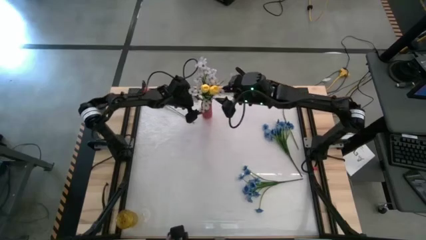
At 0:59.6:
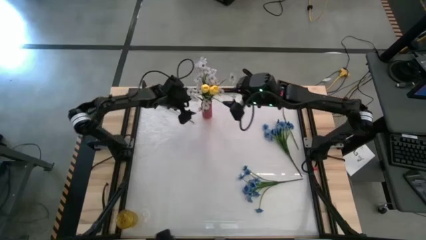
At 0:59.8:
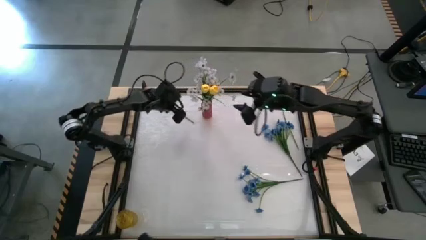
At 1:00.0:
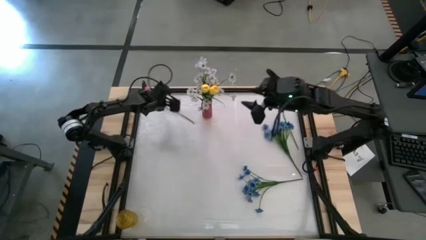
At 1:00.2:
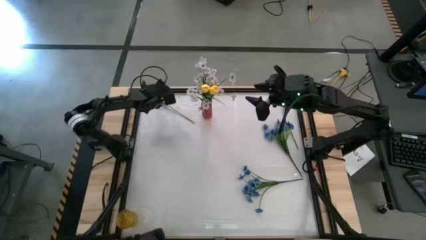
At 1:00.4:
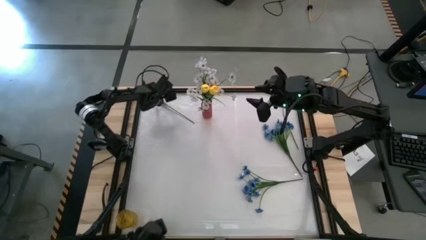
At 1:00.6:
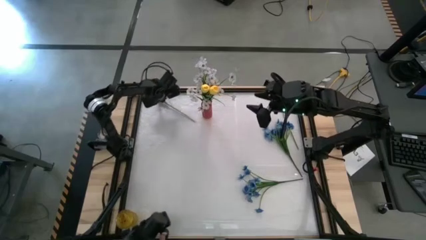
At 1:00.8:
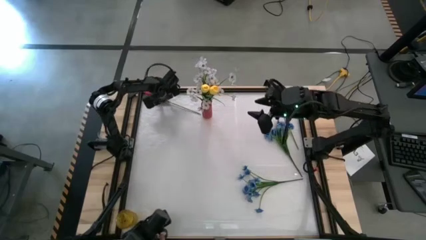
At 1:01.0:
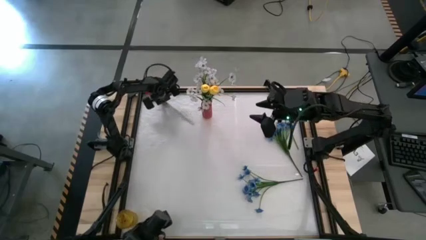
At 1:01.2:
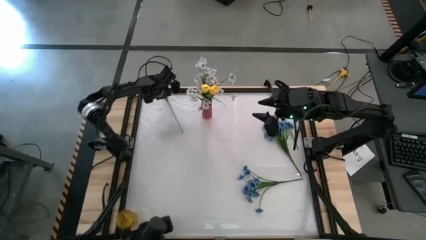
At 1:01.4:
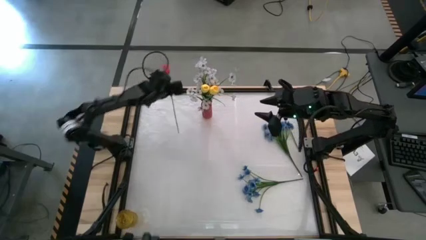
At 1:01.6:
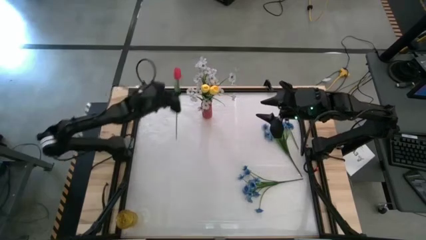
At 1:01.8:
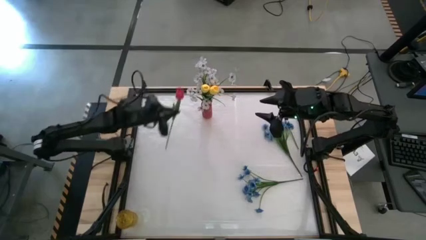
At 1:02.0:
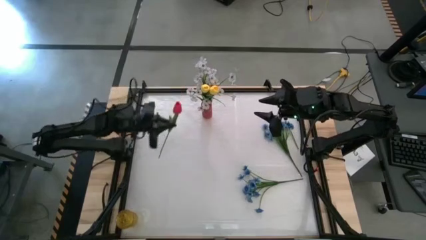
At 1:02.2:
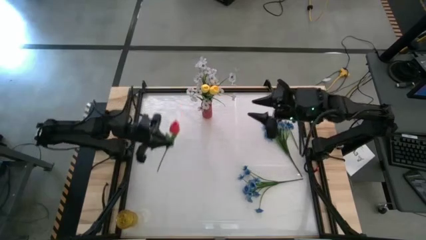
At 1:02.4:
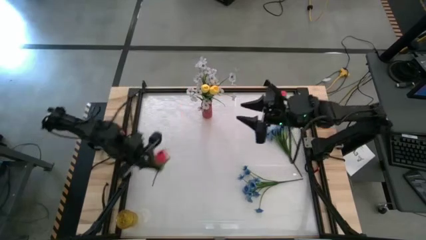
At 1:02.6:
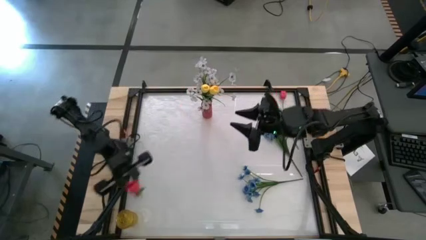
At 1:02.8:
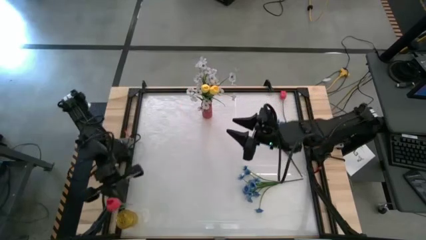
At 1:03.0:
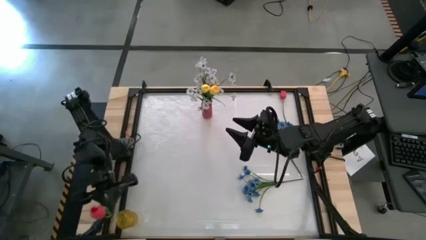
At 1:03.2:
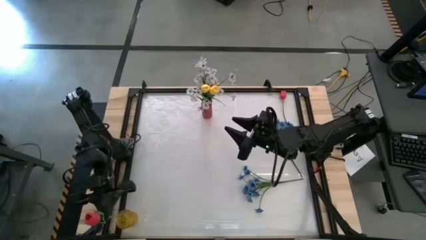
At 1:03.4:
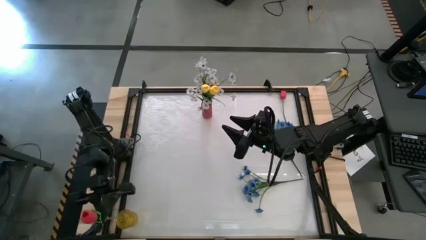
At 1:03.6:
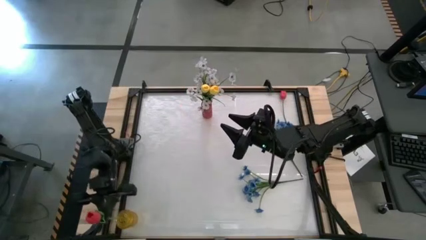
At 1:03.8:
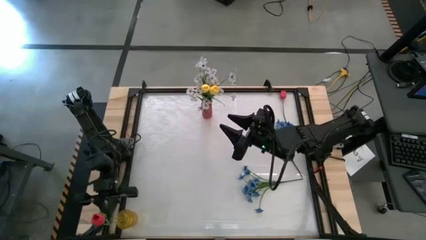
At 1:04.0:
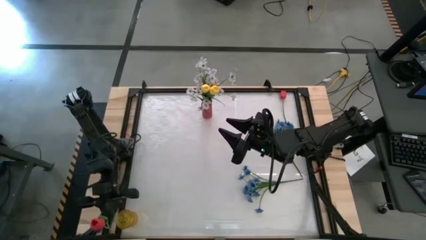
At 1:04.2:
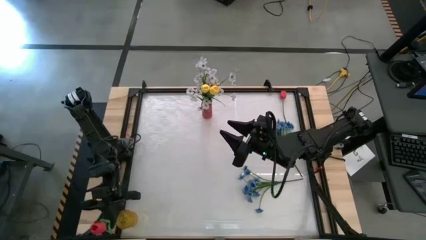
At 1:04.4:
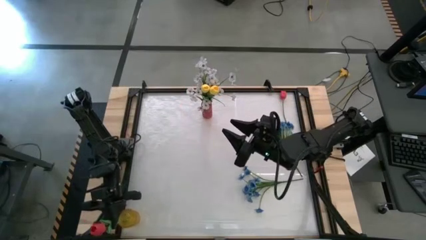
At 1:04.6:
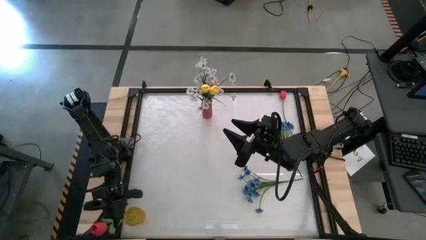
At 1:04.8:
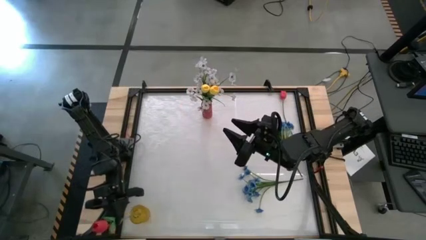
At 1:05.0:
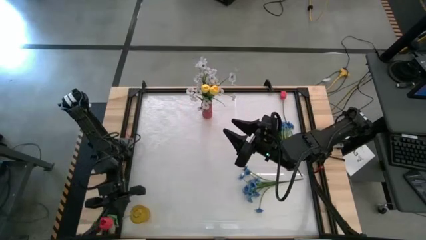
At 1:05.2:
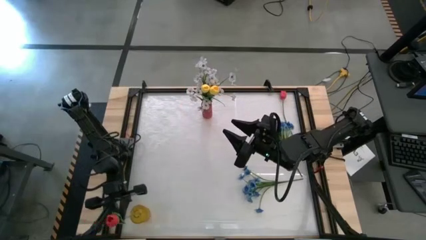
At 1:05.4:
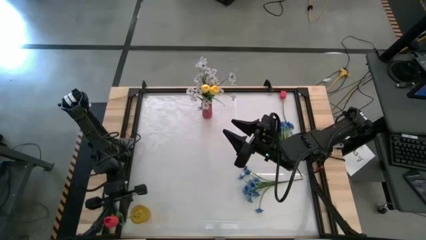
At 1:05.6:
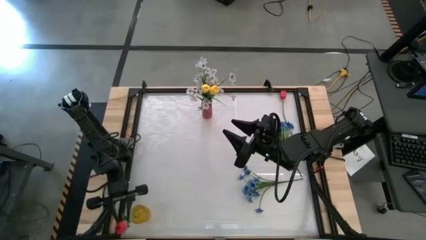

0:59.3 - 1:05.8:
Task: Sort flowers into vase by color
Put the left pink flower into the yellow vase

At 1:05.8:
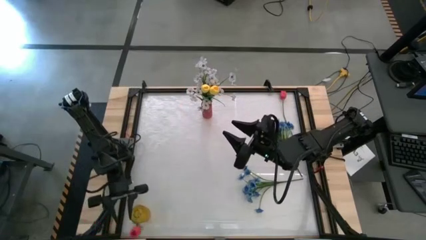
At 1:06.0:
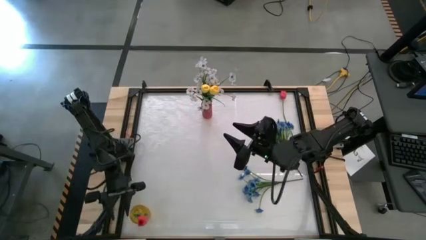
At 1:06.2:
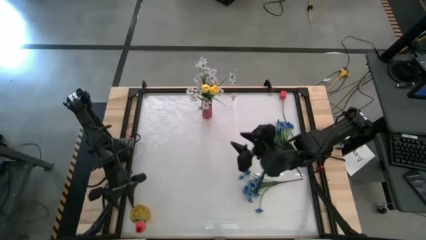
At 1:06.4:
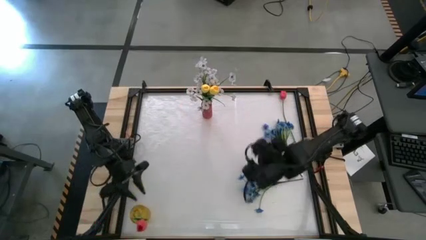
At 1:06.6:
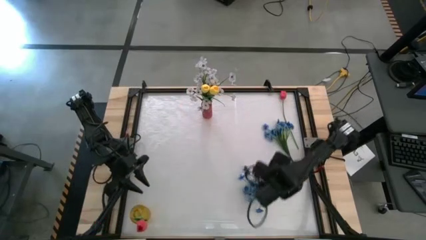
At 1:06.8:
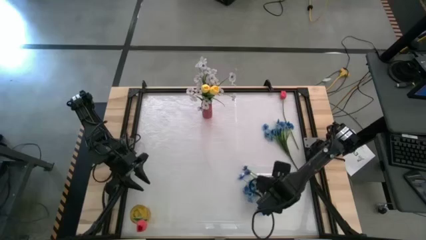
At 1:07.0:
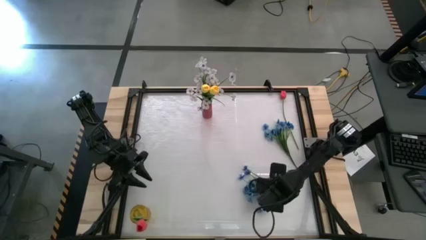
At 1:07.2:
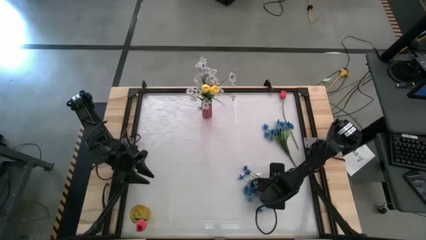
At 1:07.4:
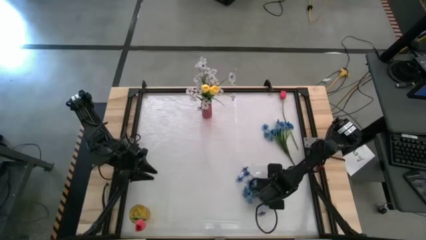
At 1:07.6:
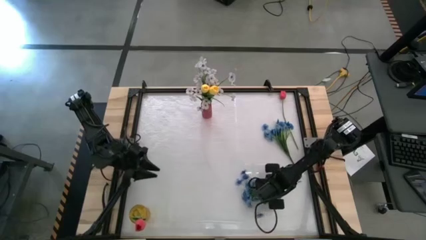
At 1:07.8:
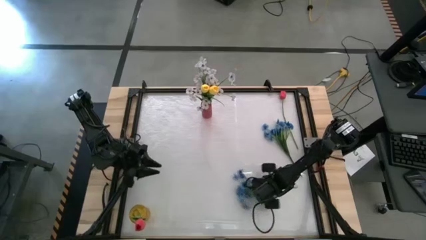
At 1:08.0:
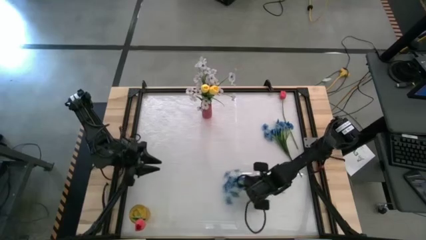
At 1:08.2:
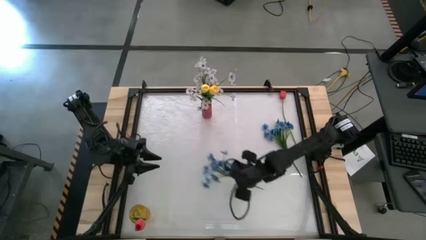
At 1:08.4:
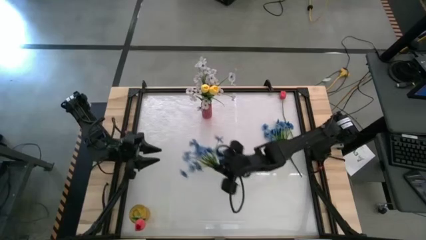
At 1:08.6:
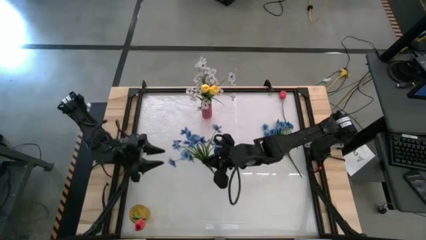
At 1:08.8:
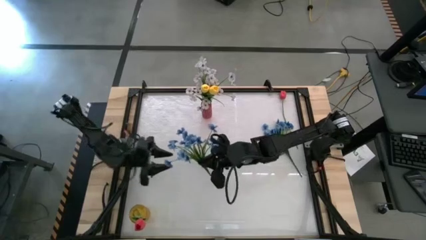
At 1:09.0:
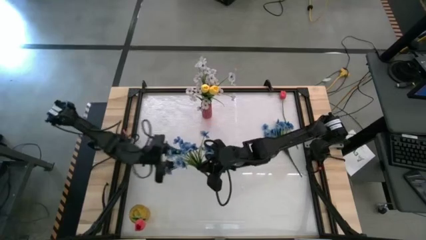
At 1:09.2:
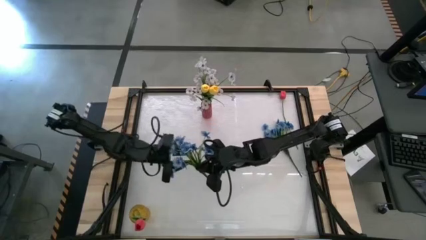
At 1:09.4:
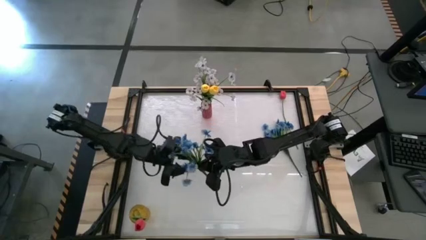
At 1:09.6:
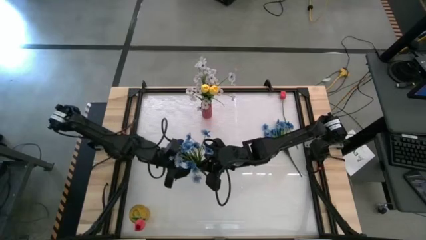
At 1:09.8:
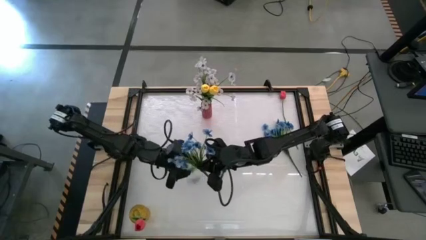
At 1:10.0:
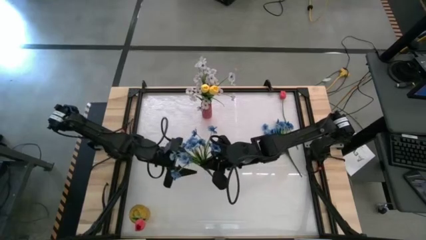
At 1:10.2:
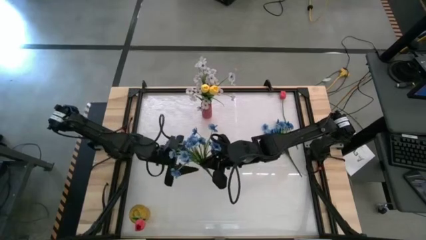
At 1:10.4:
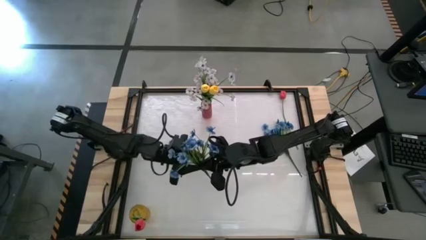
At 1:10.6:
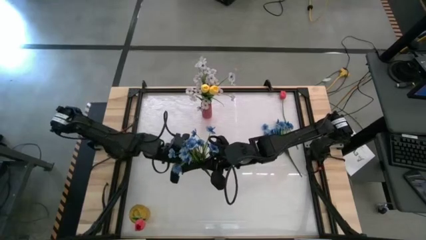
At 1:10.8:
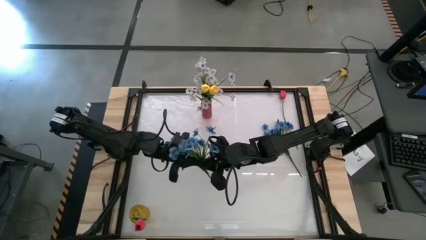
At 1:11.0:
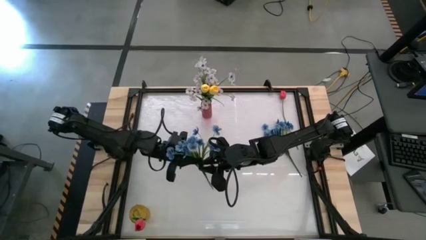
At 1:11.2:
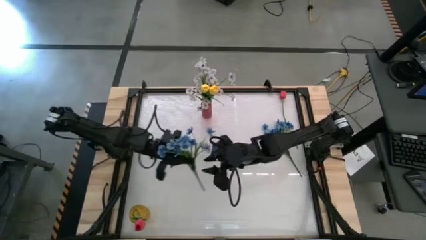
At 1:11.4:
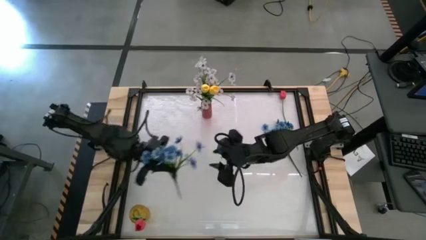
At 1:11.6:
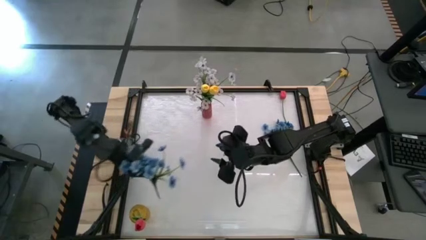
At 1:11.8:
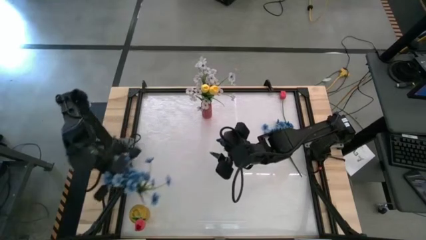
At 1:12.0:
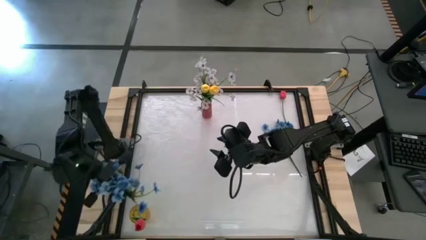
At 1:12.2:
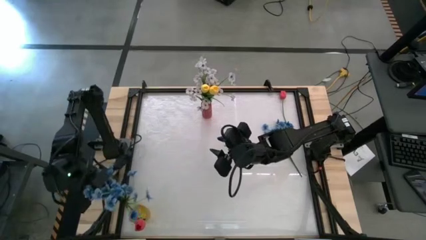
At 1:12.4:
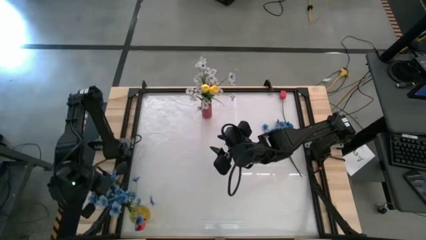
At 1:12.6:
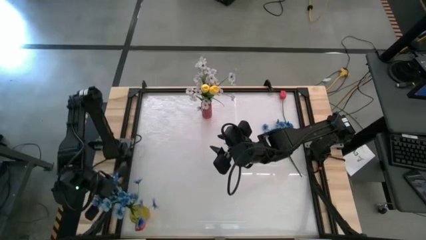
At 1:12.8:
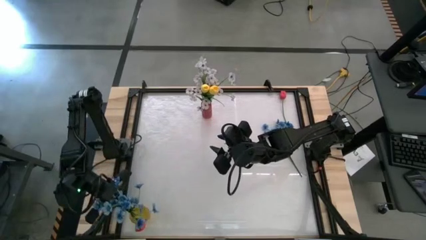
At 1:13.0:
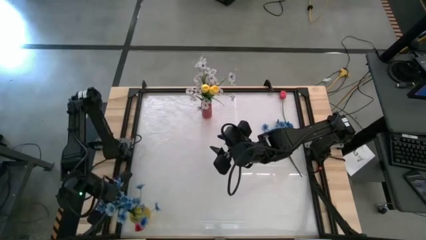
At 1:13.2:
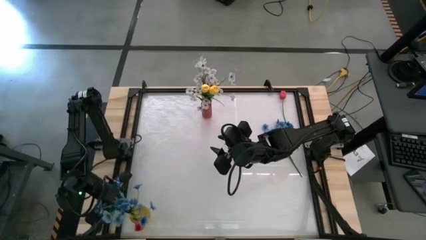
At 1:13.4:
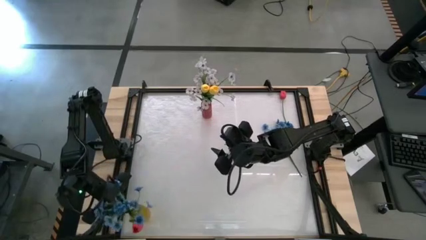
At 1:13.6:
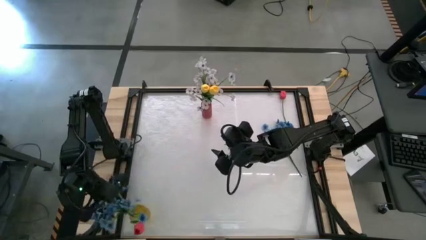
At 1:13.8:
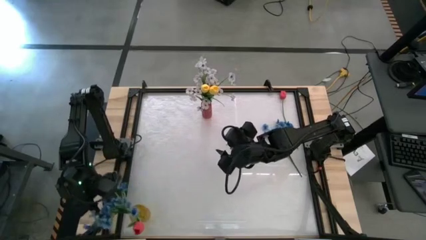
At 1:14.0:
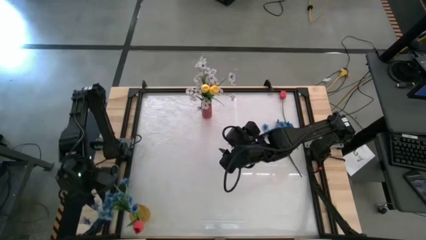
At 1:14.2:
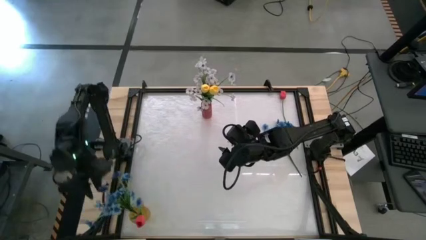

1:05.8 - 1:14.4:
Put the bottom blue flowers into the yellow vase

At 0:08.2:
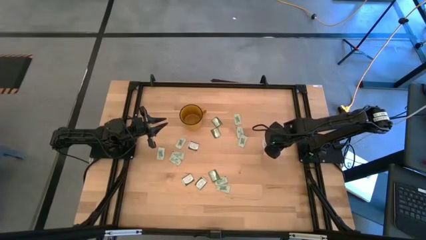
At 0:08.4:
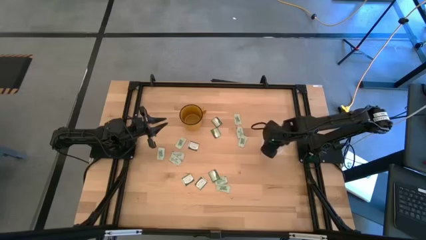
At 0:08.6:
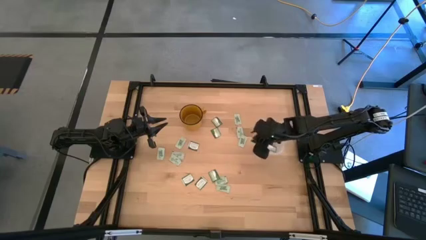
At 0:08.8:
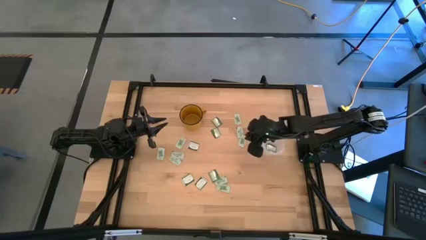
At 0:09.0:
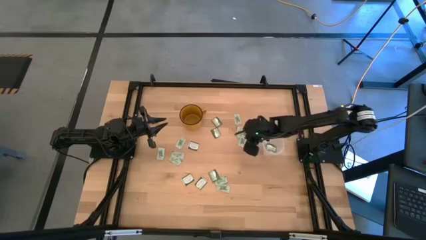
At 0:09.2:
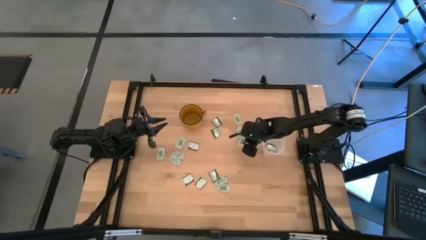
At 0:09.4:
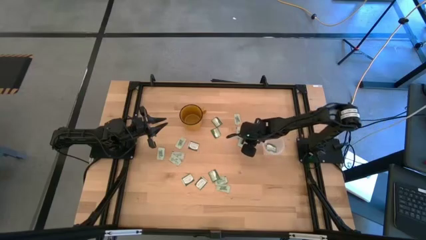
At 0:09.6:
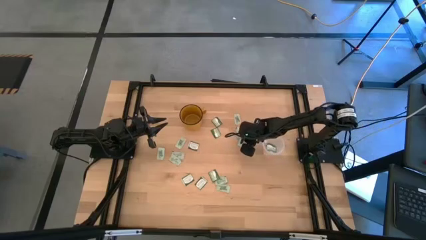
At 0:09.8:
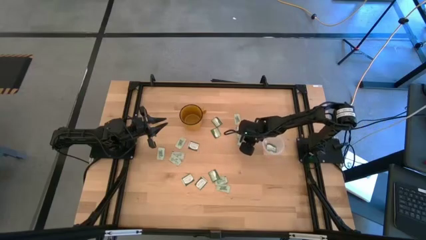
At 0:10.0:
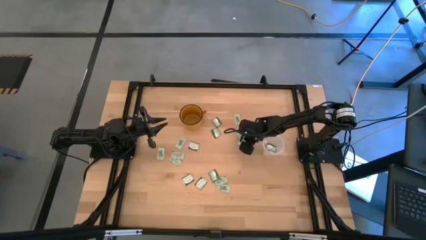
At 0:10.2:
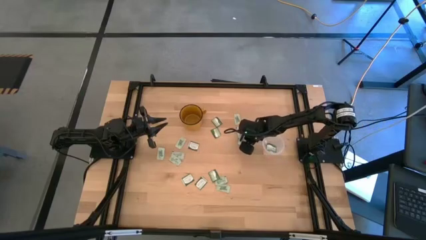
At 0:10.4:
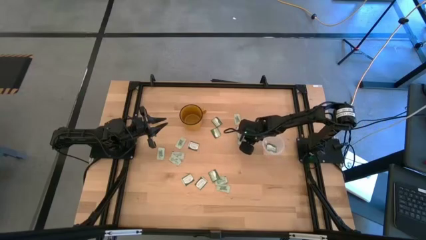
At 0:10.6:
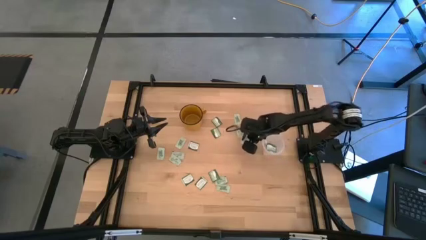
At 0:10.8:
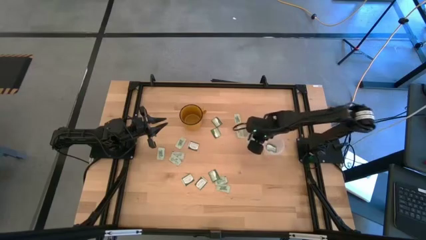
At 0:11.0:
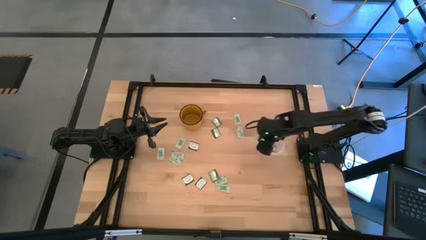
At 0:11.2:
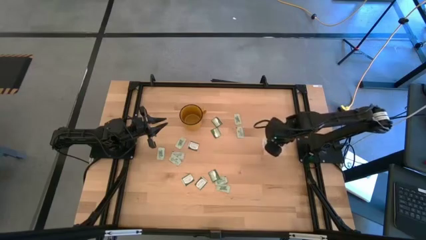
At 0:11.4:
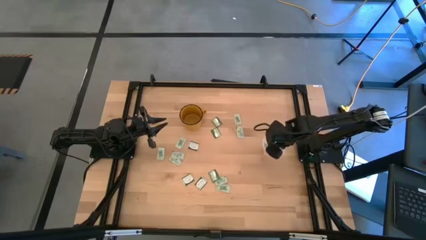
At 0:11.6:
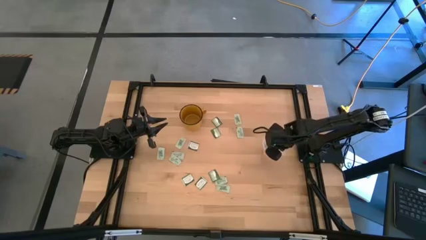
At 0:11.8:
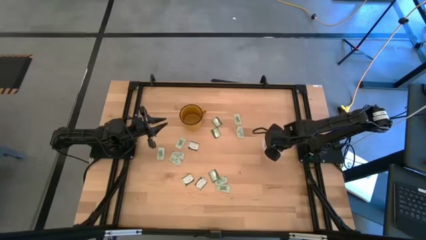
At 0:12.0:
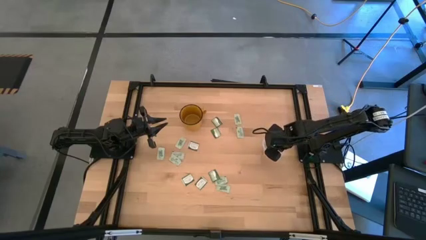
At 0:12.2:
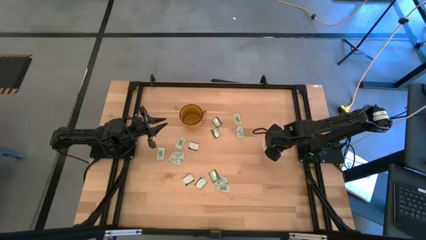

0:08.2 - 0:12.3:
Task: Pick and place items into bin
Put the stevia packet into the transparent bin
